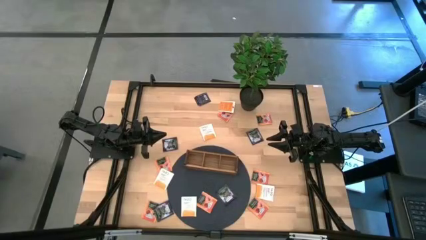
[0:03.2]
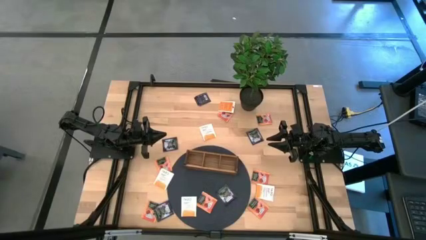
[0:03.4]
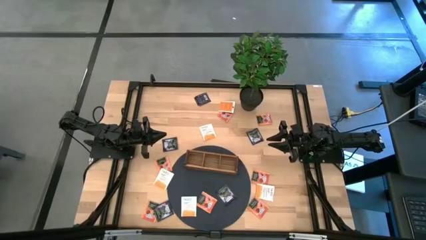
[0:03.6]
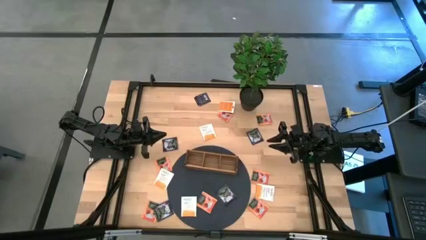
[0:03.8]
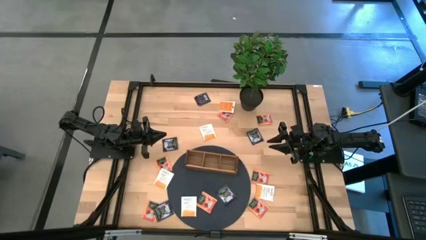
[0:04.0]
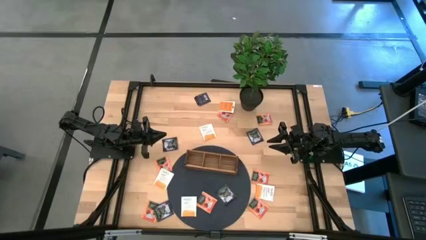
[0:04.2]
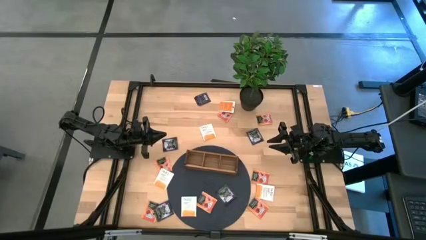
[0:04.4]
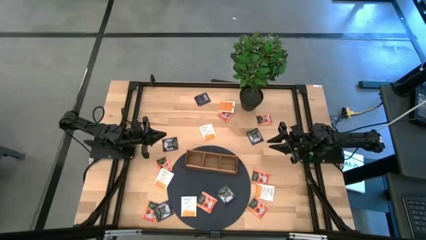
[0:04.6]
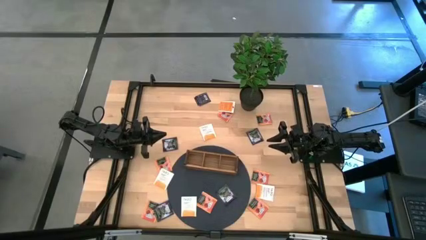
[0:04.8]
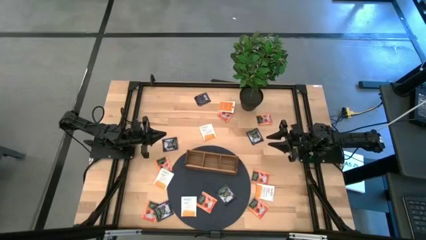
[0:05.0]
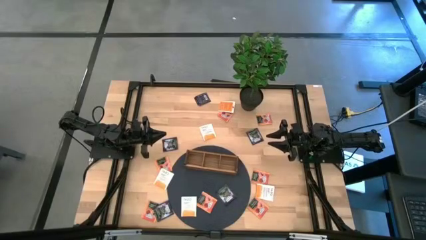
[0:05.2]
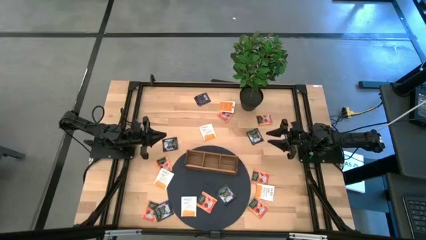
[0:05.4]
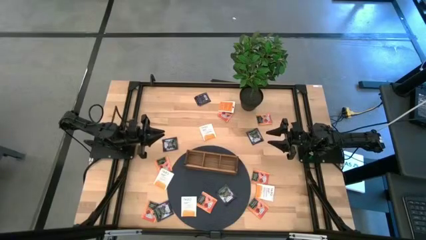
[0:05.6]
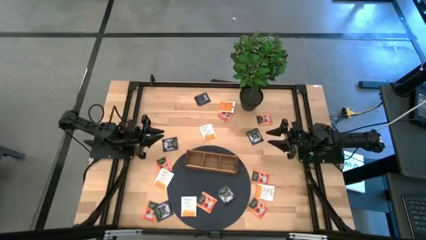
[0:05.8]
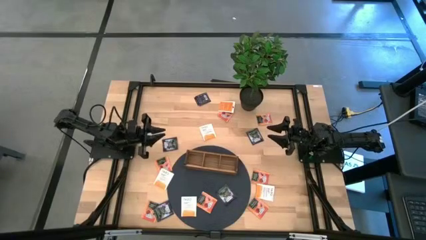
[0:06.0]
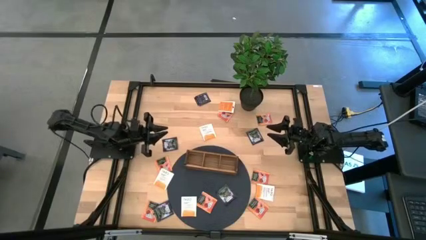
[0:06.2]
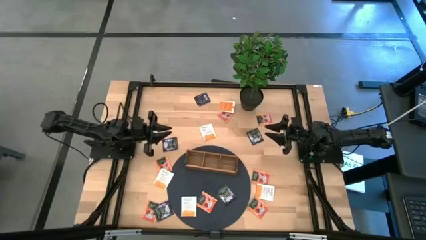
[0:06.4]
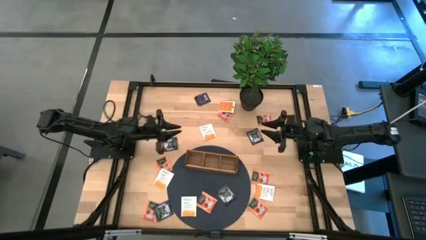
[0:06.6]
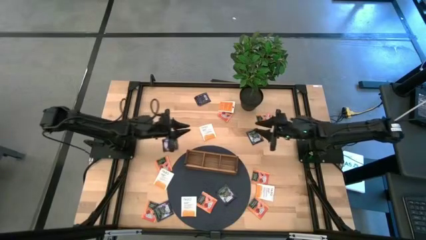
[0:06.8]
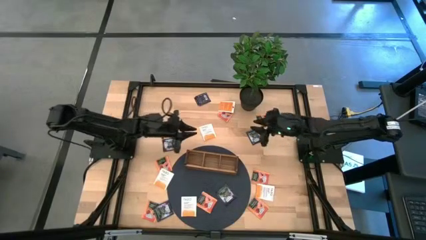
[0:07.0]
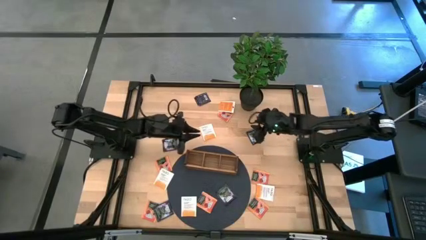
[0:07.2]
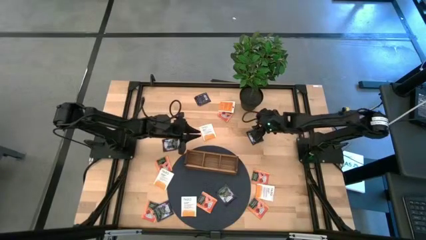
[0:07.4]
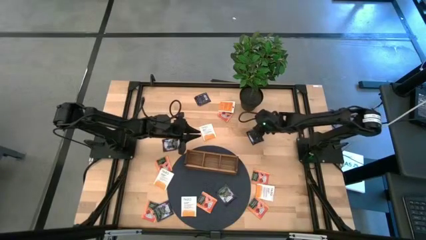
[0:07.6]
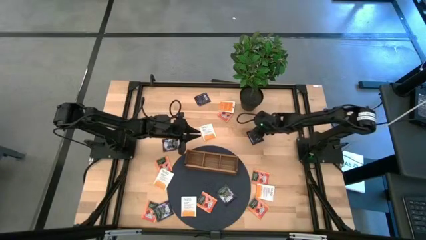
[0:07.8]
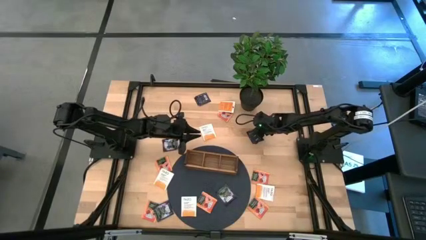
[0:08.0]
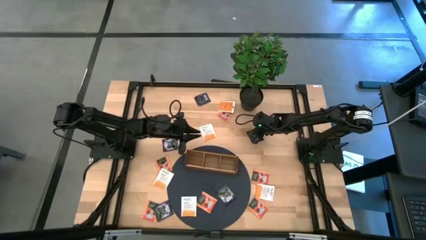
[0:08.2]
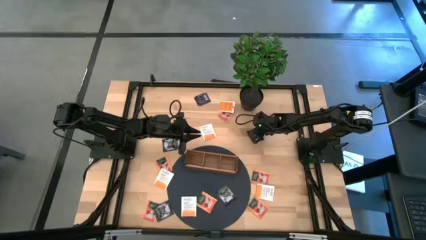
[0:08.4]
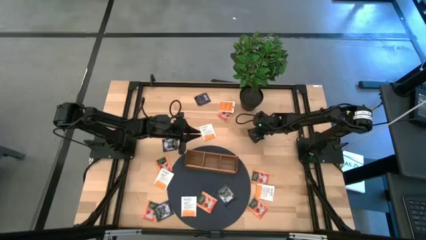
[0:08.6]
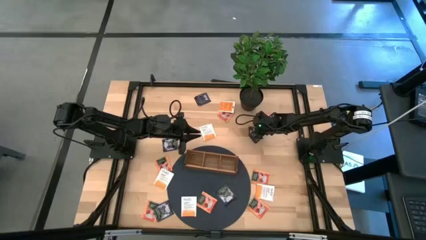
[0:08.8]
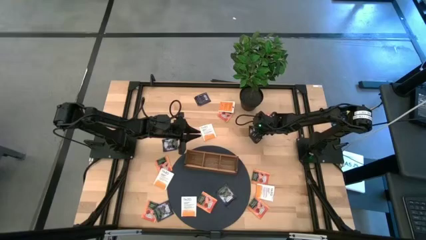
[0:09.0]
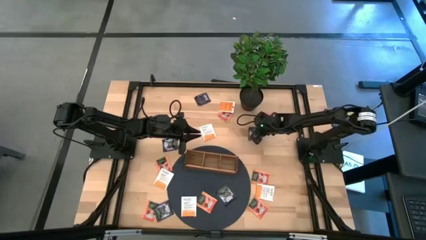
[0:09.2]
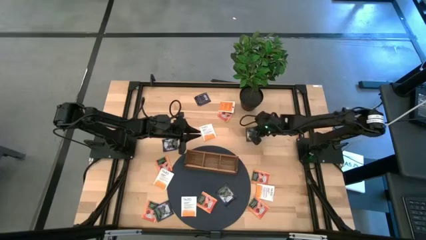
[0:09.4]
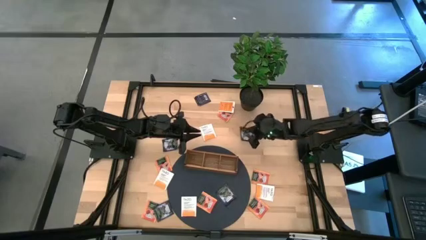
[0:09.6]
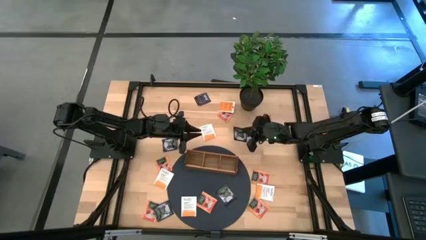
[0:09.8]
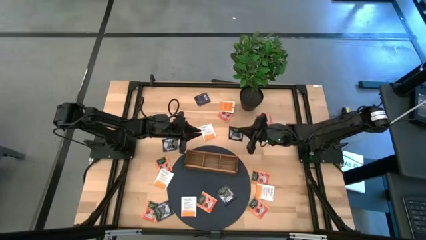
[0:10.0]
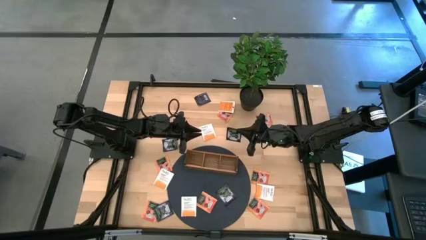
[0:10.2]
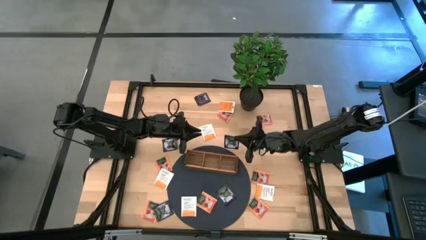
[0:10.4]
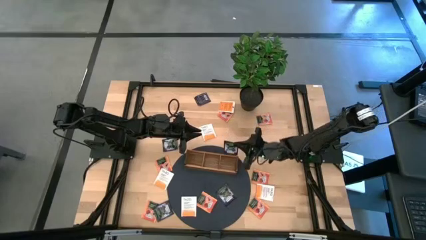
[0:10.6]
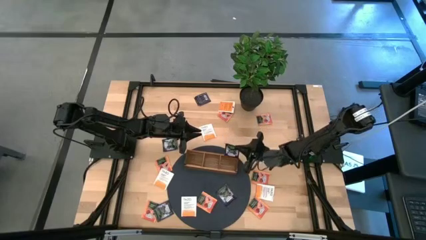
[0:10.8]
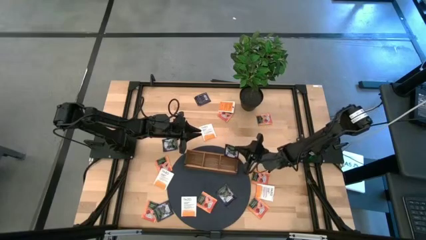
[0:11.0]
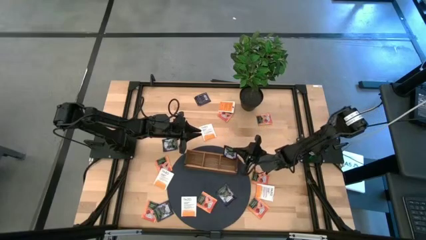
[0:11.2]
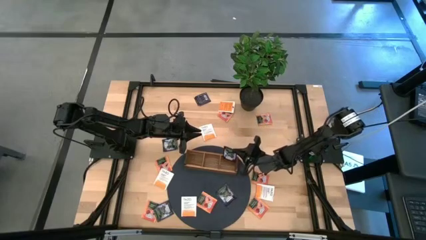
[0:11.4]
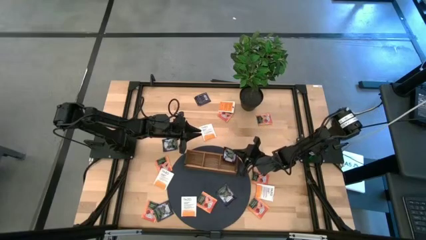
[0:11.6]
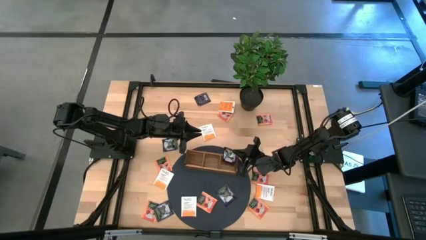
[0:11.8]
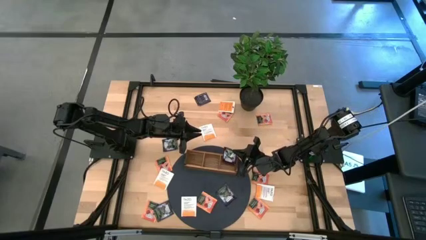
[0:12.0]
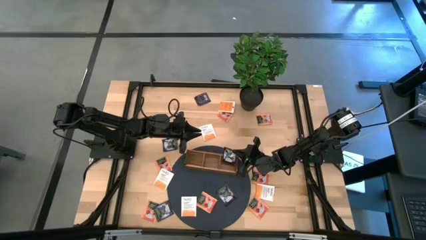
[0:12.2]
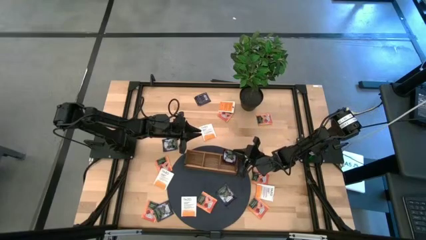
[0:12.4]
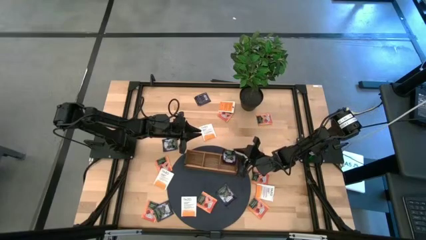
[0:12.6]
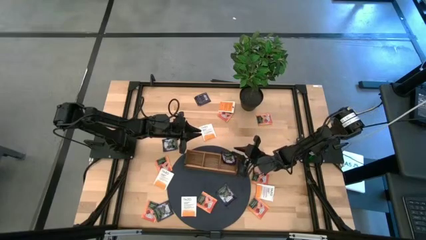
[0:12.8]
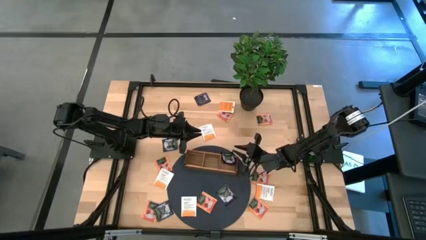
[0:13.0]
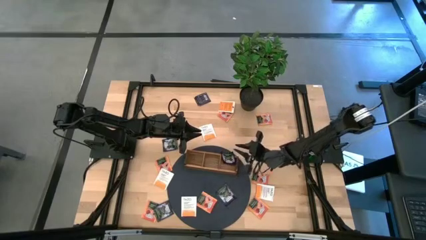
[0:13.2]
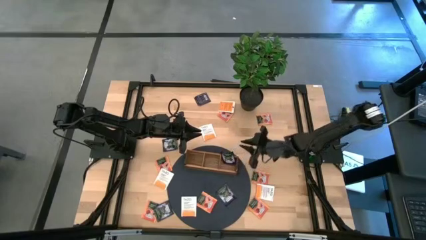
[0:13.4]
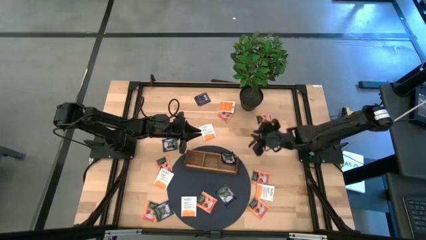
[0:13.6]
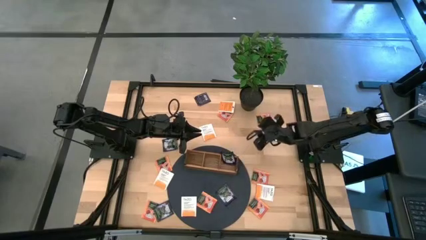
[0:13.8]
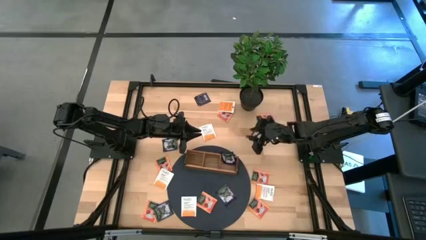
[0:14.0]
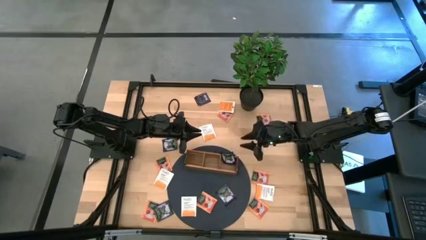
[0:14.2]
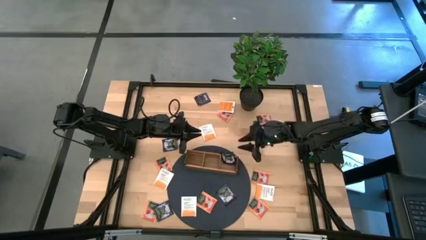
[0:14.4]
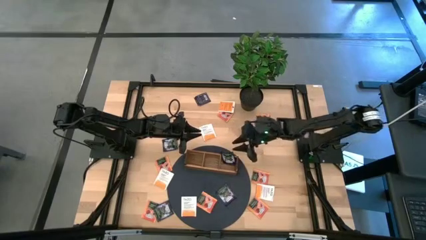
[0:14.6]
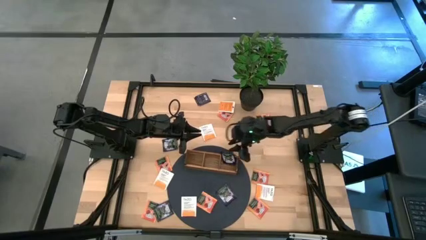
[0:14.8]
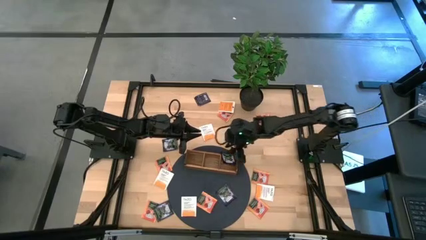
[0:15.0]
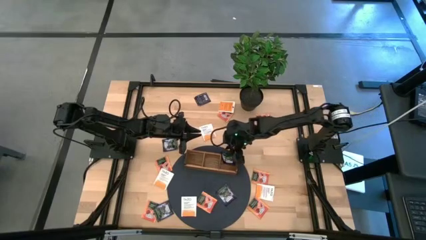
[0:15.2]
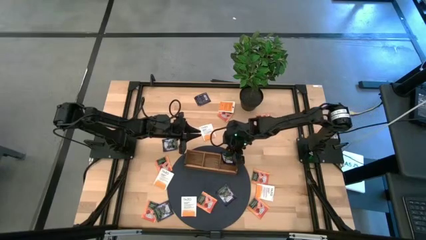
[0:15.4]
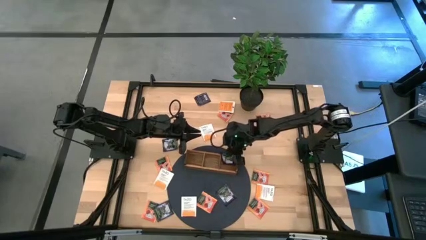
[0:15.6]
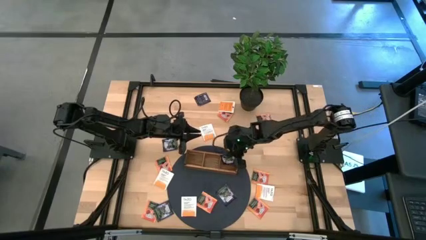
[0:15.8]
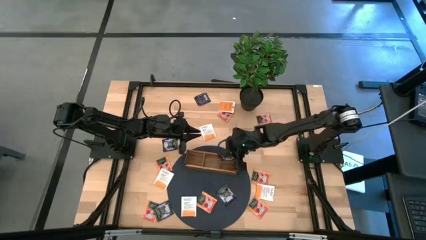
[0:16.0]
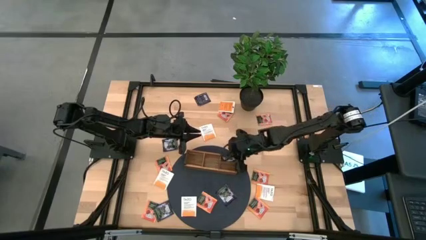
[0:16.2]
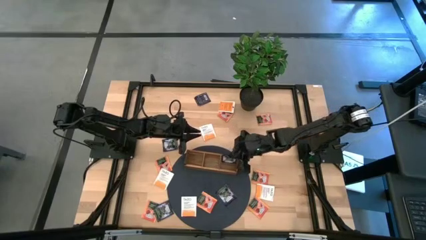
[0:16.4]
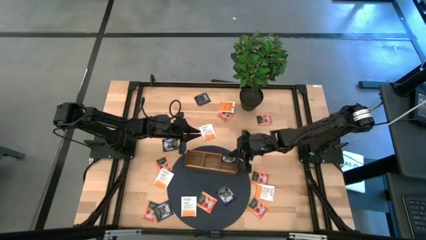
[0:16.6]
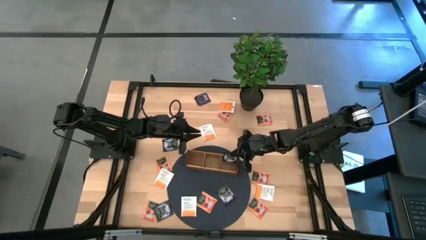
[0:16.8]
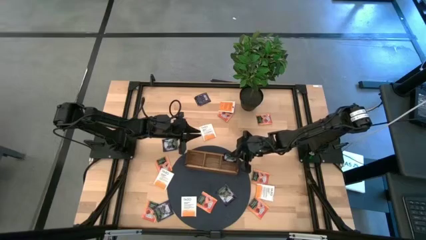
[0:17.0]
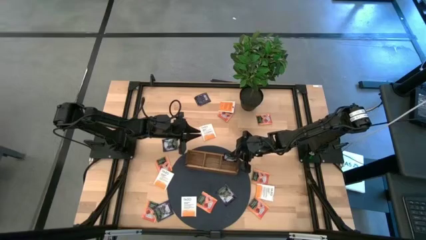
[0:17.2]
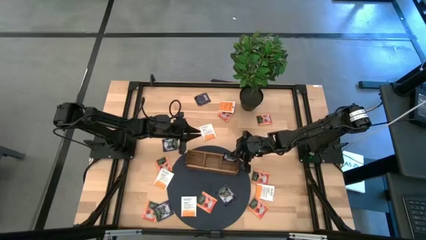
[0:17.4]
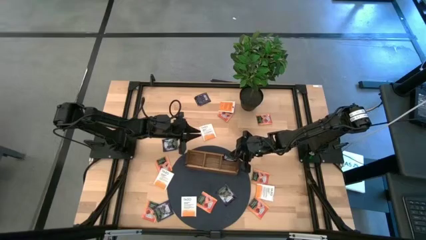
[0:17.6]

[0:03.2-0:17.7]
Task: Pick & Place Tea
Put the black white tea bag into the right section of the wooden organizer
